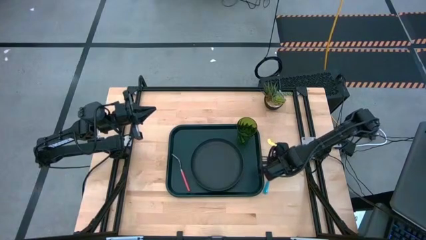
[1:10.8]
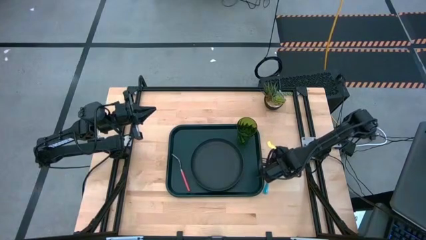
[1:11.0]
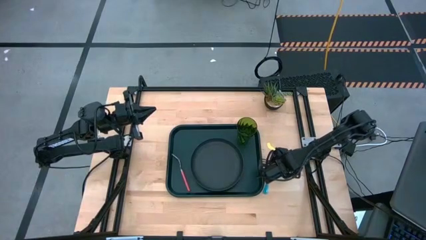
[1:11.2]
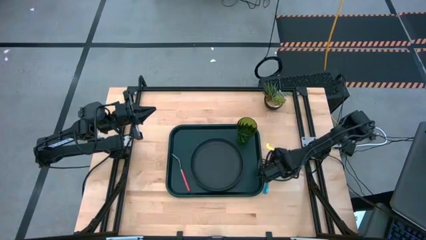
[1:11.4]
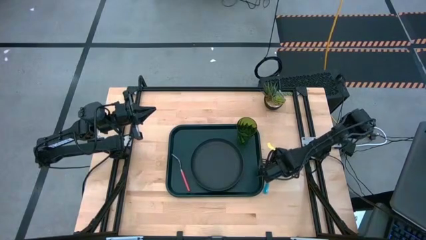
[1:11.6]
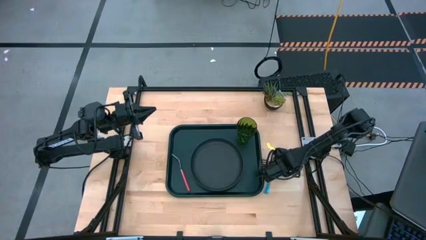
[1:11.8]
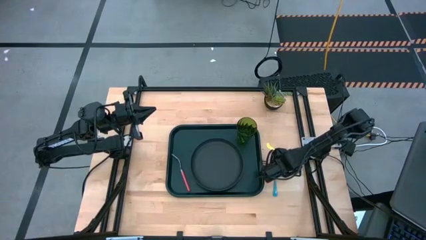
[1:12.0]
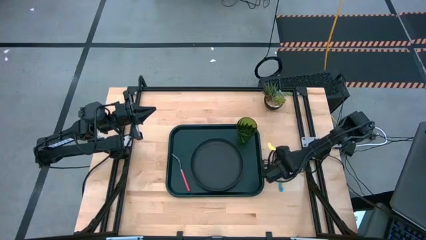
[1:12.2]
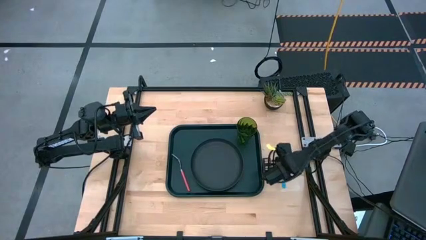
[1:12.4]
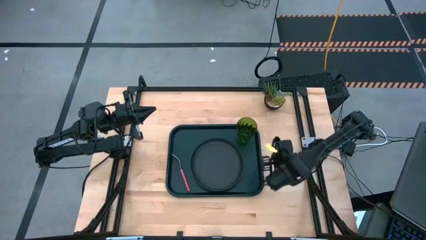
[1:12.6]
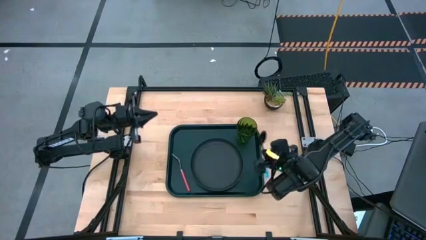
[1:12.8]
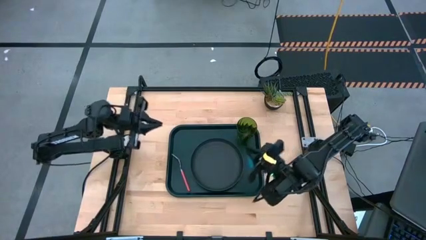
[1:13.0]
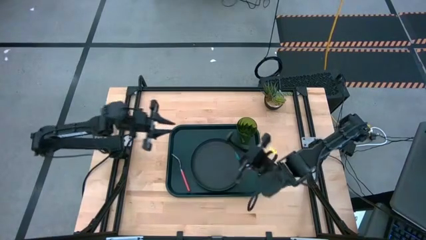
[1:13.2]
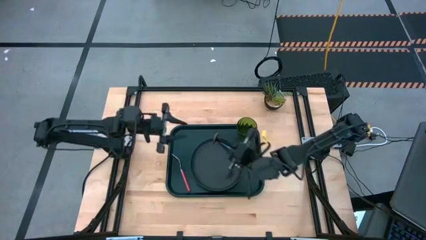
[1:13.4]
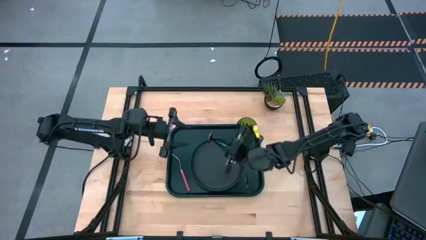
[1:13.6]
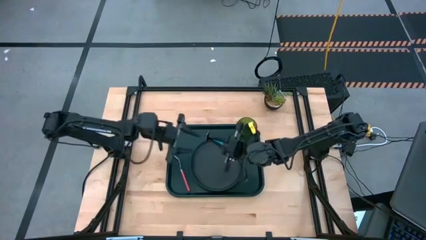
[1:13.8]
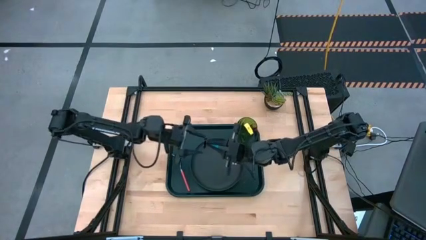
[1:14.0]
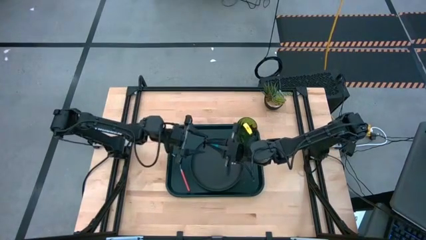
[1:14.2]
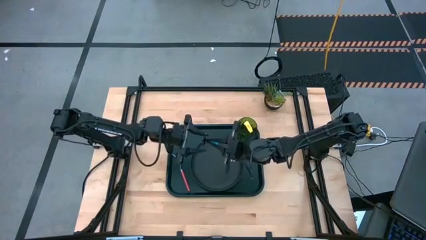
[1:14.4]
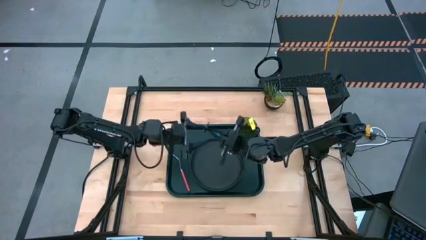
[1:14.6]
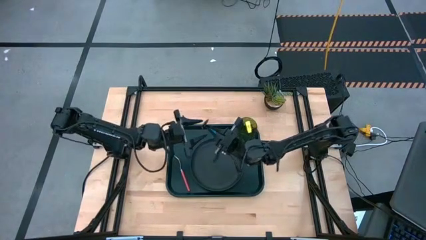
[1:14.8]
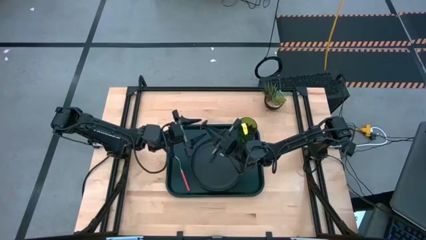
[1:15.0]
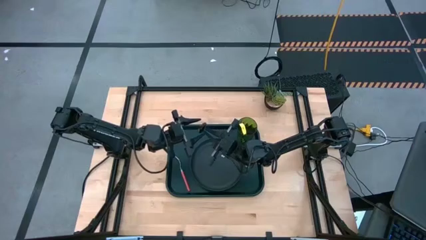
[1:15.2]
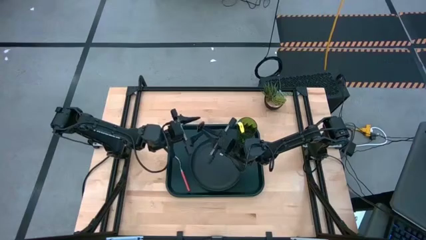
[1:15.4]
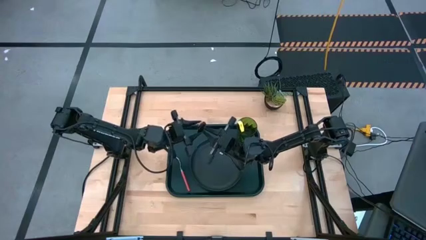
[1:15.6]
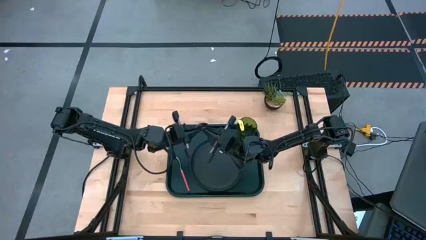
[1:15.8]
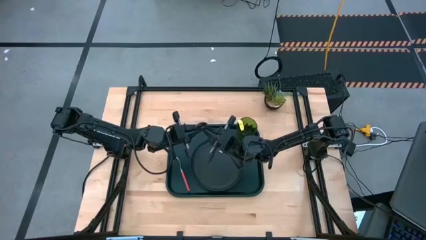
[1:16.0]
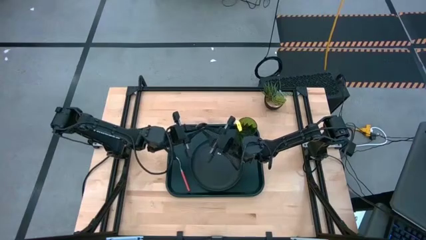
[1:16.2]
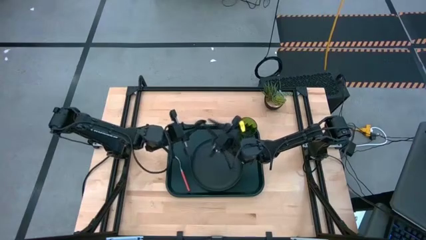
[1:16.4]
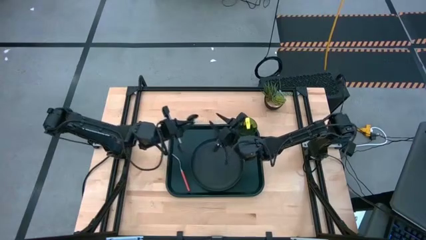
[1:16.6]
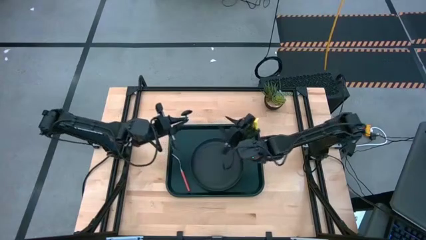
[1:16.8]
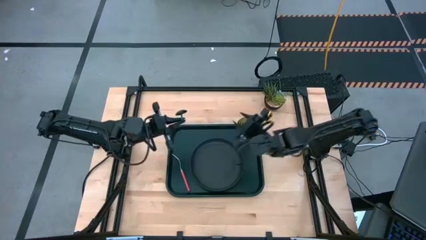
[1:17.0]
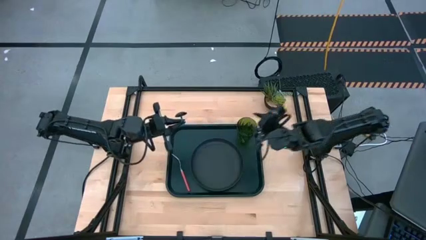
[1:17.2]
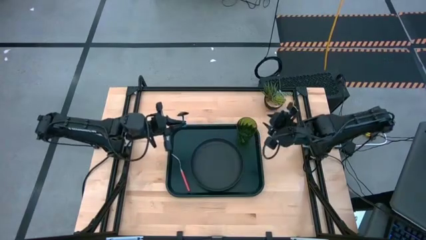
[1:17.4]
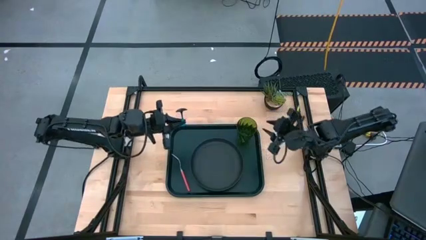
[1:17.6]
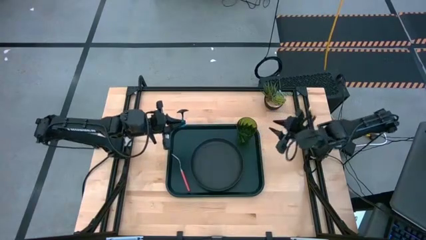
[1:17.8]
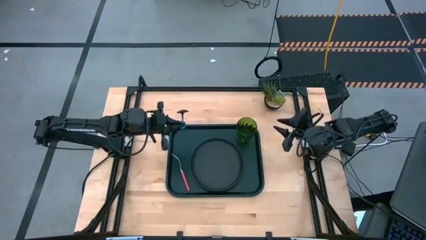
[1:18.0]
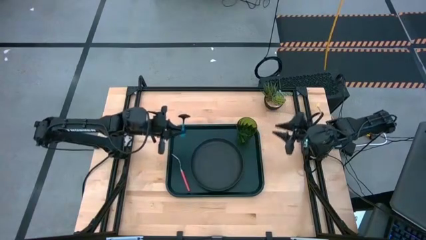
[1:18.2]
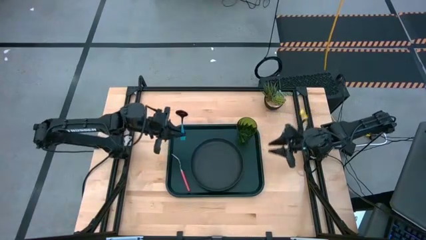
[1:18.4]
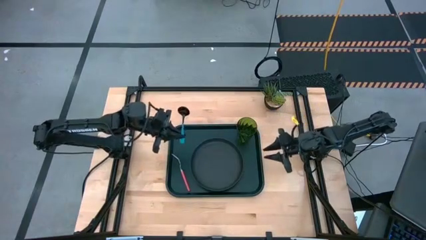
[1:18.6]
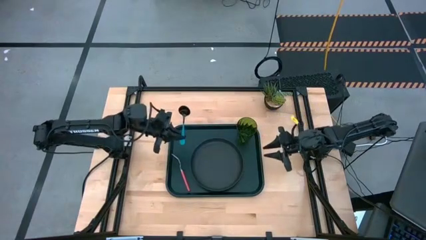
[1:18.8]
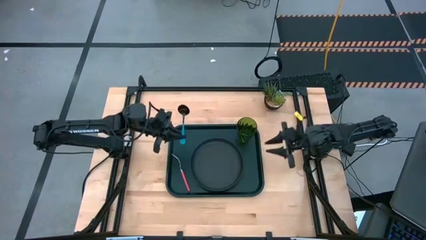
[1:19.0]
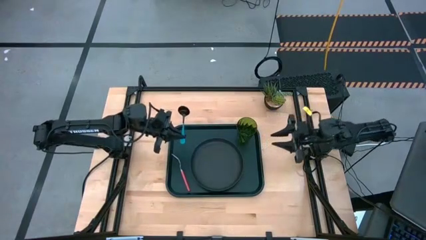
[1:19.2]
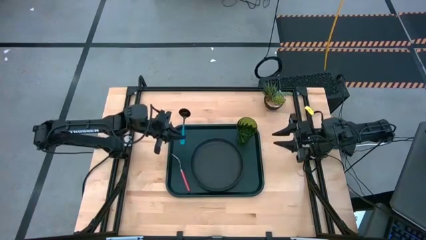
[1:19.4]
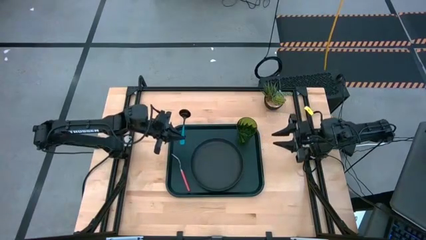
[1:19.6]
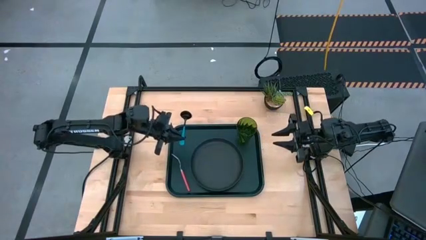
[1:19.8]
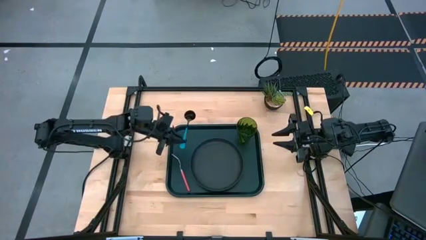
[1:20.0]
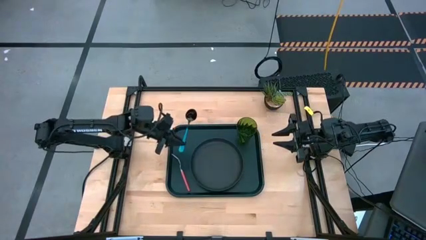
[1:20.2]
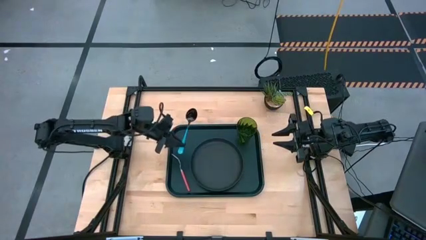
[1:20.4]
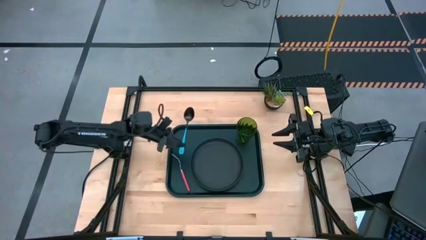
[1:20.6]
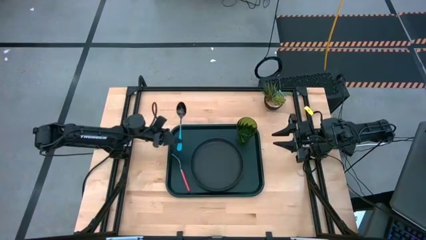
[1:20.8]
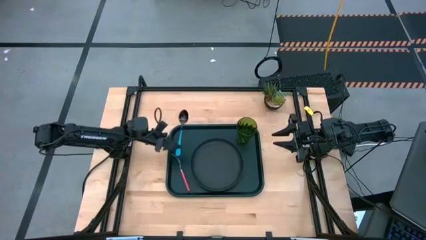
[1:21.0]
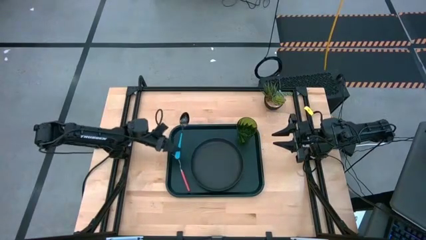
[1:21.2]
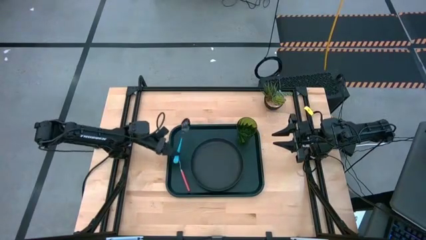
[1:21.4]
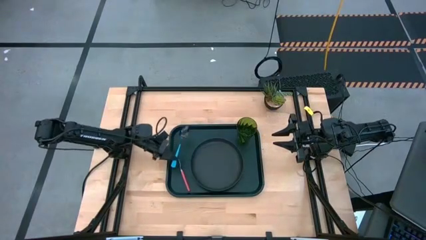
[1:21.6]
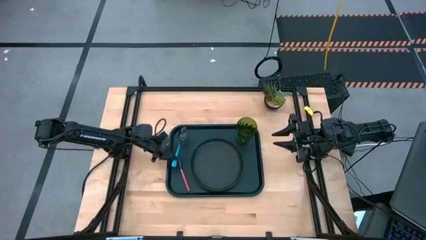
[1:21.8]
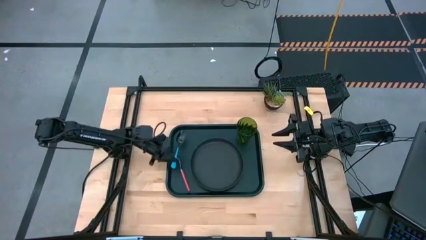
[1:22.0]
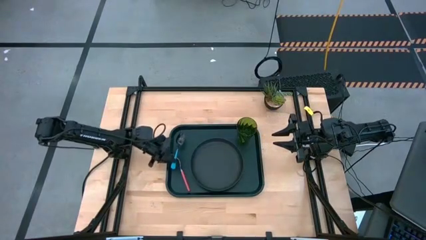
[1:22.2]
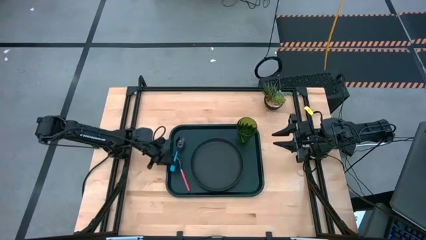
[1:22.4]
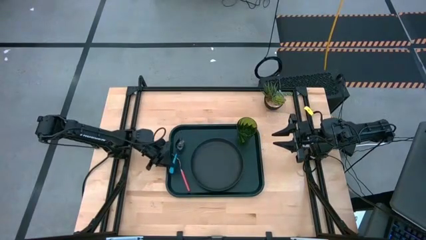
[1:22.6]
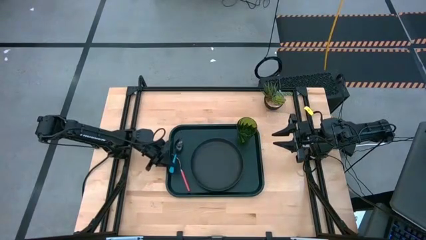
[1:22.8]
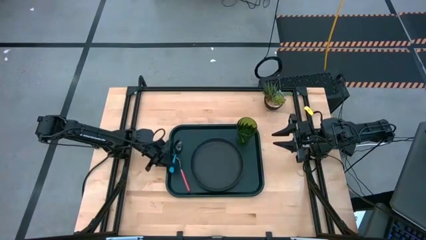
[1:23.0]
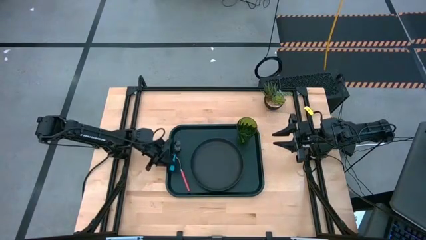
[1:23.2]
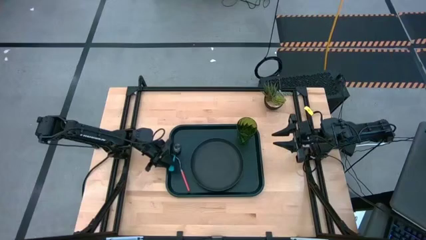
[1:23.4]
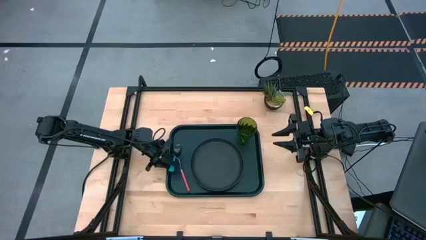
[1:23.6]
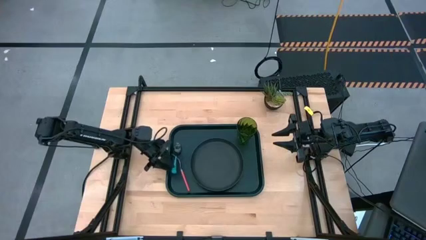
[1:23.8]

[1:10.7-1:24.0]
Task: Pick and place plate/cup/fork/spoon on tray
Put the blue spoon to the left of the pink fork on the black tray

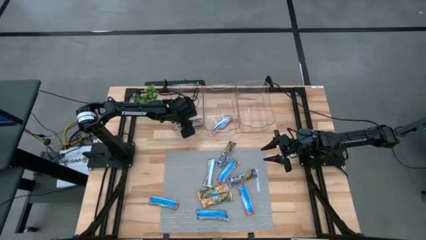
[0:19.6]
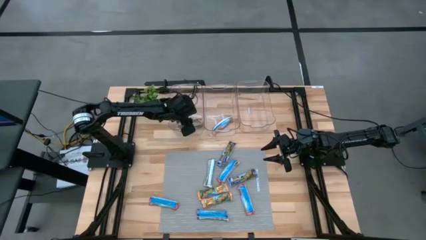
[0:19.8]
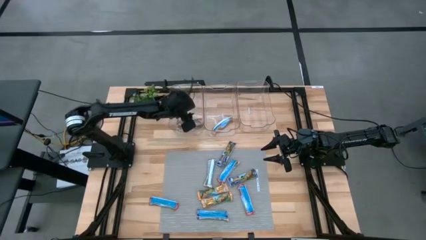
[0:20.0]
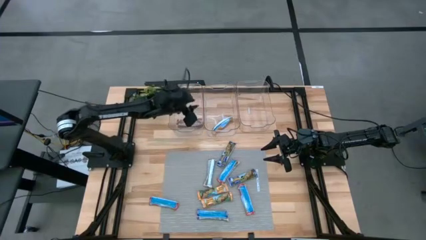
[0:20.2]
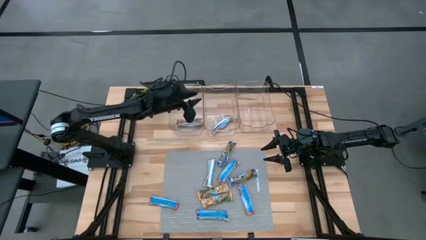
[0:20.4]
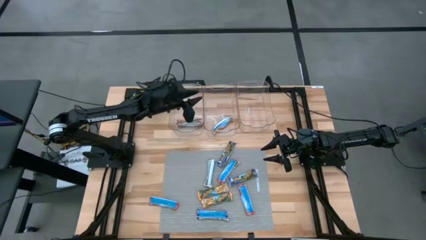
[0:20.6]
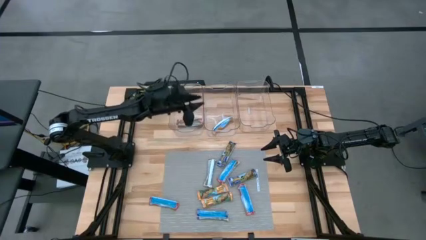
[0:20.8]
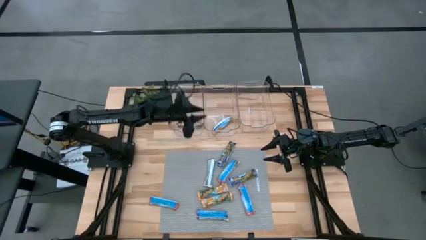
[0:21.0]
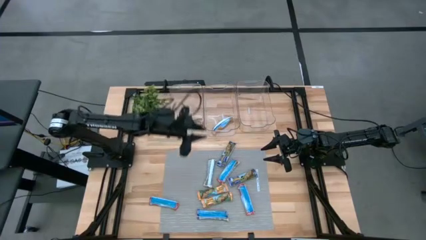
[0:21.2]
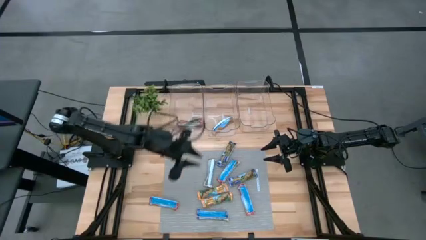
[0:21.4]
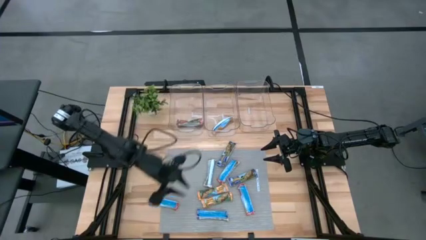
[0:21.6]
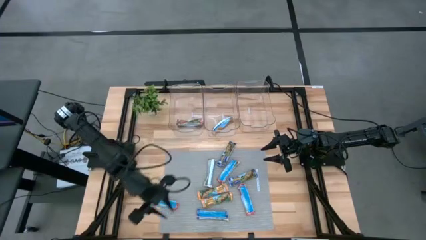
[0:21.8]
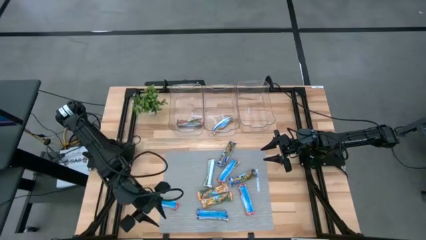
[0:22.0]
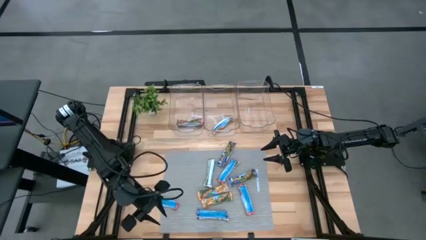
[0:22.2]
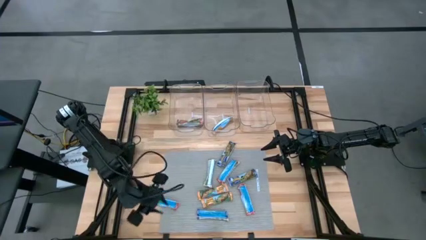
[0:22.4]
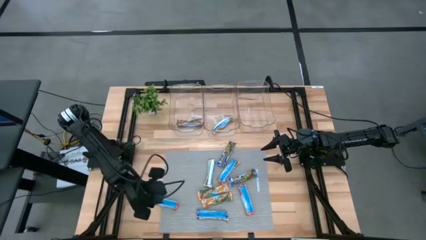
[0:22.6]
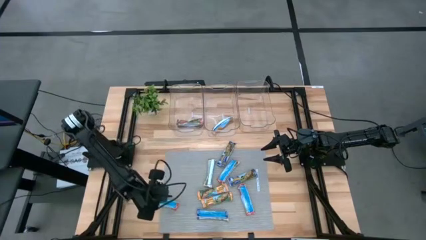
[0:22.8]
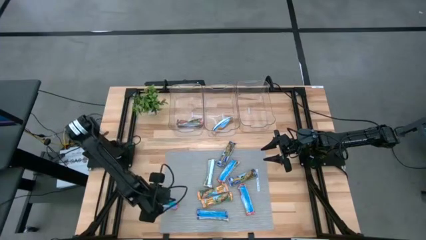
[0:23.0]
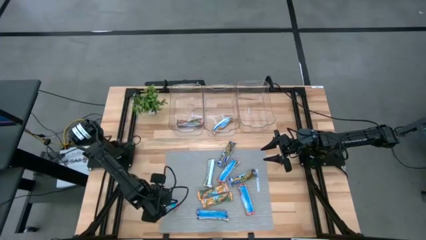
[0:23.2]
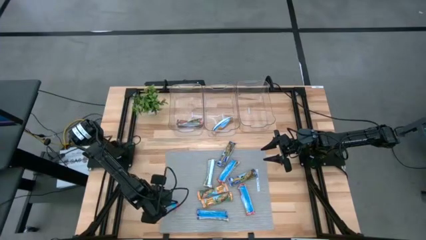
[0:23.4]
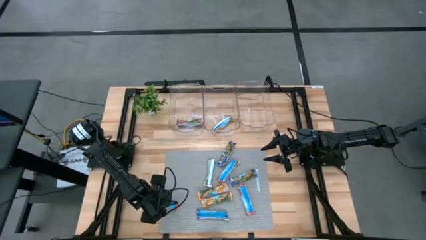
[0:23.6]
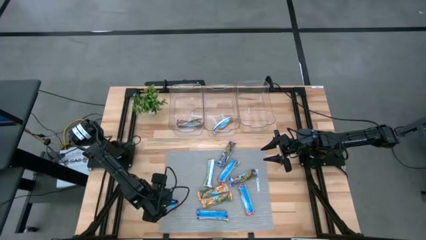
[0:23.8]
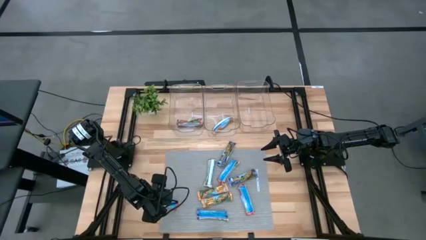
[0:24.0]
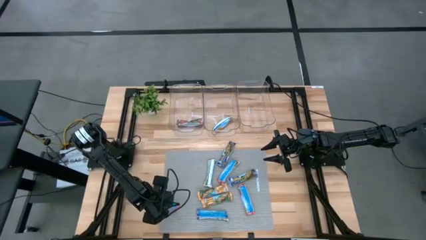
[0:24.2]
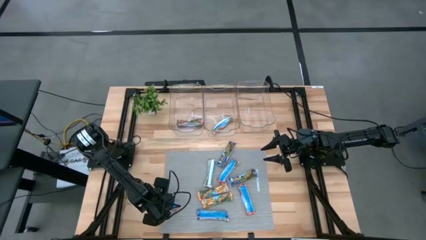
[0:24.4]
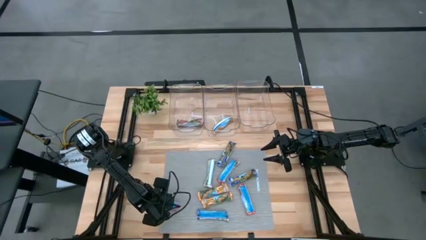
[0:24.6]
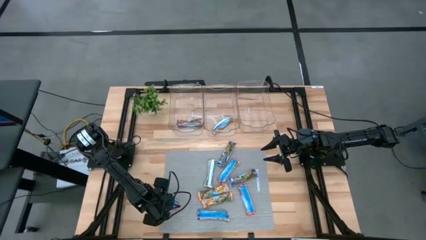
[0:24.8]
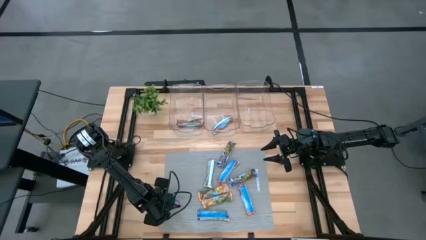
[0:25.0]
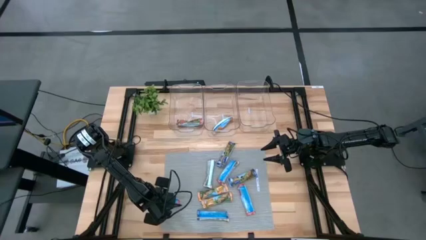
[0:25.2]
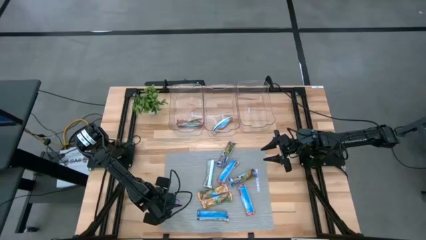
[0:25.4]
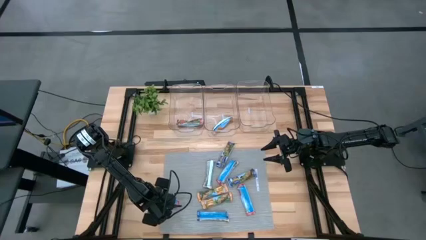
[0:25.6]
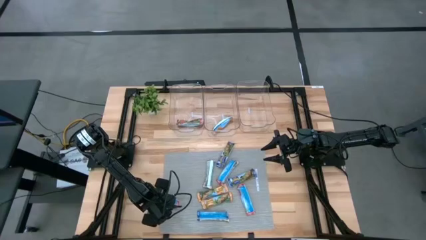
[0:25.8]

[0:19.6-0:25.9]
Task: Pick and place Granola Bars by type
Put the red granola bar into the left transparent bin
